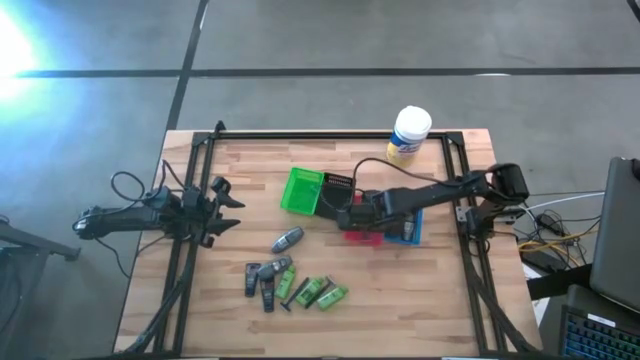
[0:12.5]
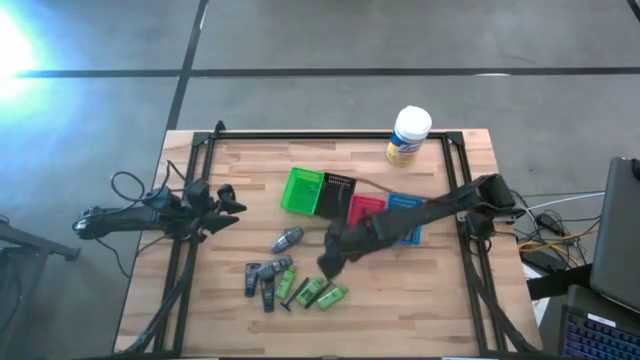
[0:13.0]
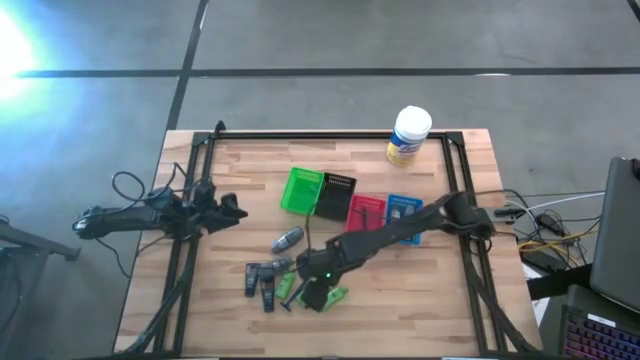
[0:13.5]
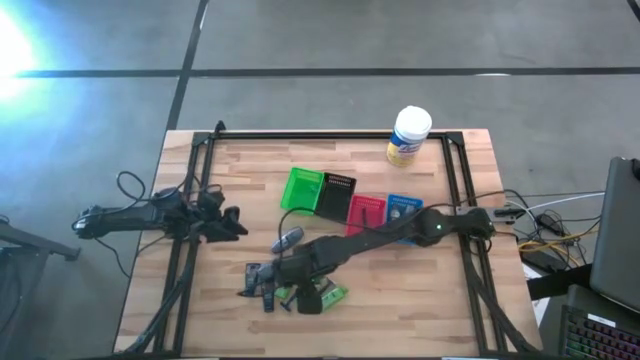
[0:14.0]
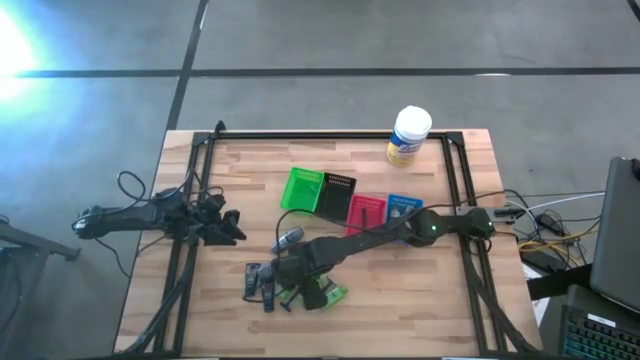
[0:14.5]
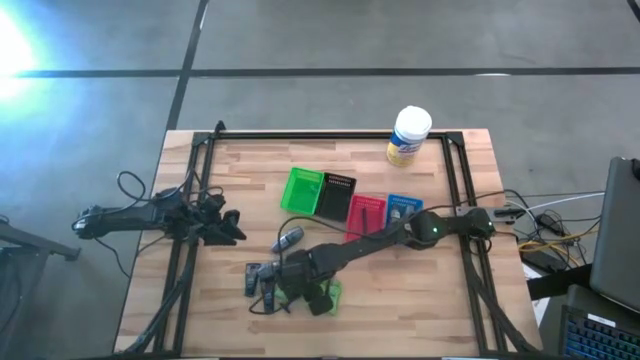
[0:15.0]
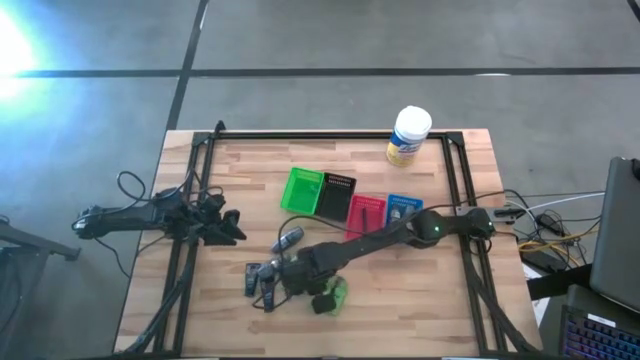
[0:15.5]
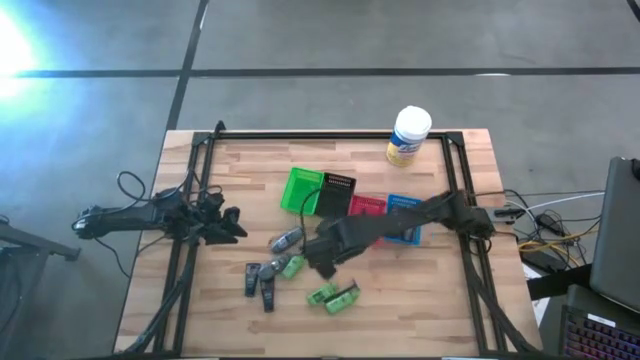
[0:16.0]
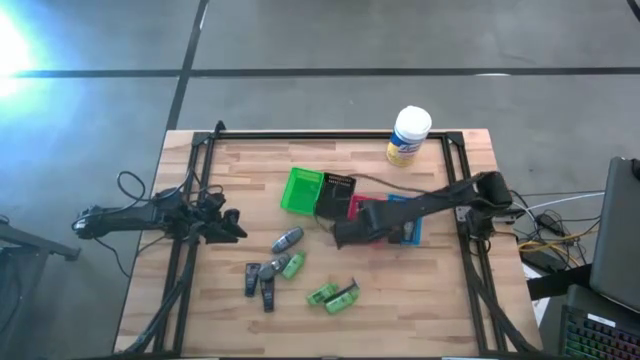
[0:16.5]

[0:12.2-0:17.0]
Task: Pick & Place Travel size toiletries
Put the razor into the red bin

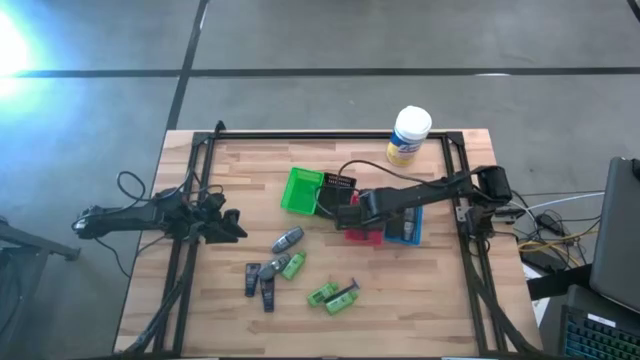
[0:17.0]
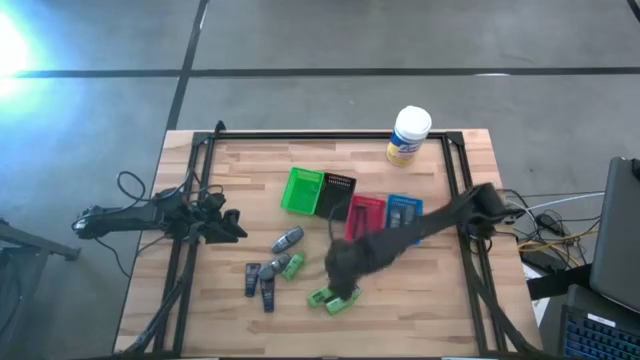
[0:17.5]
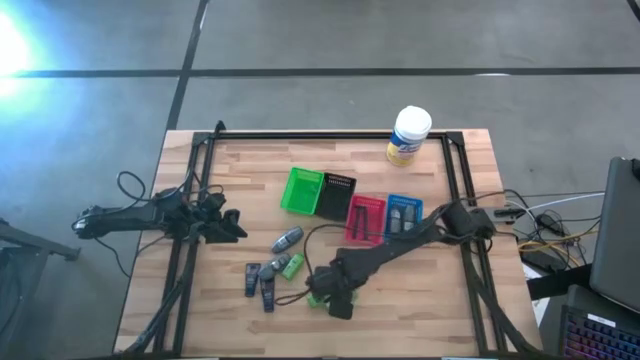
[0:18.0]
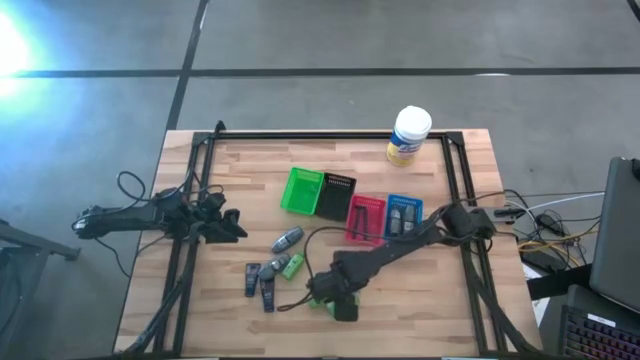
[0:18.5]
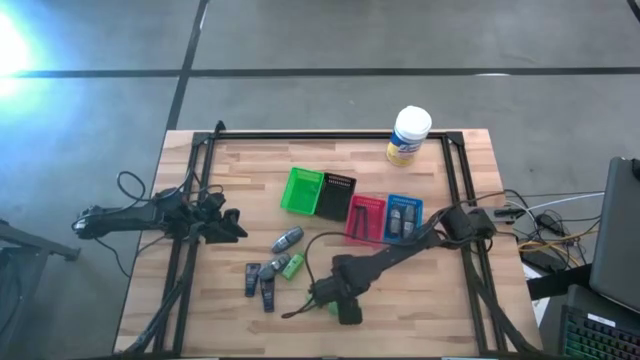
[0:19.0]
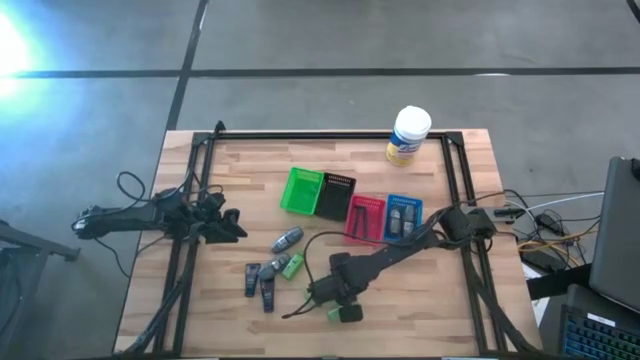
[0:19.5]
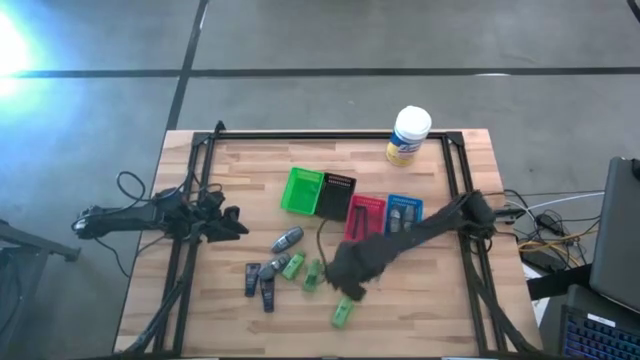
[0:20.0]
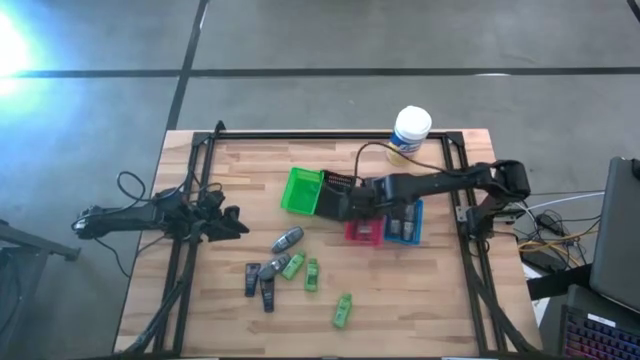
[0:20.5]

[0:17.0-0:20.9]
Put the razor into the red bin

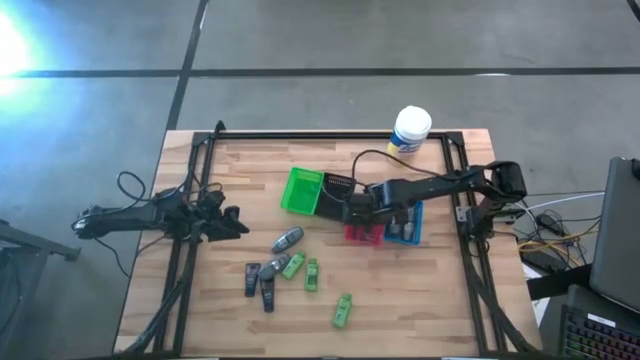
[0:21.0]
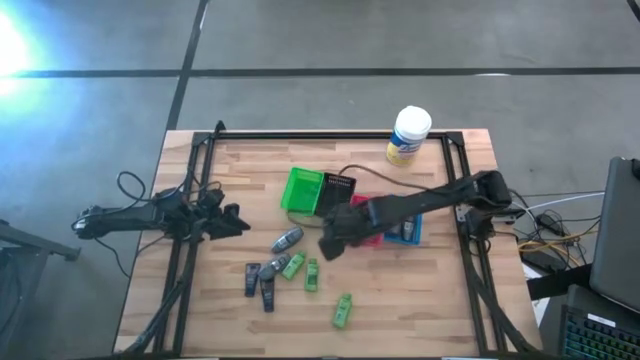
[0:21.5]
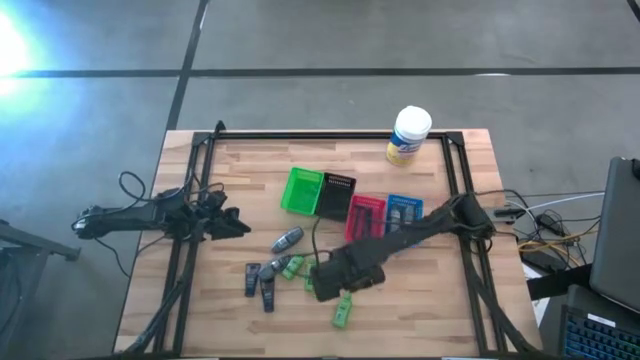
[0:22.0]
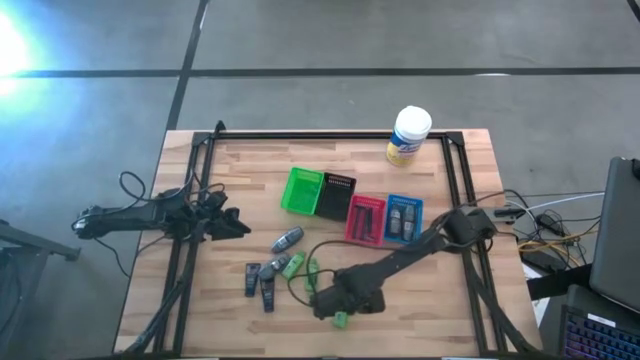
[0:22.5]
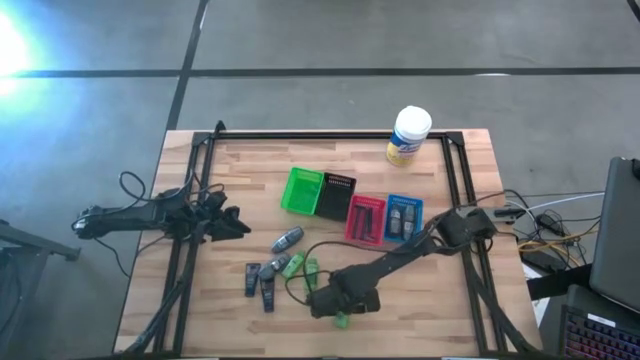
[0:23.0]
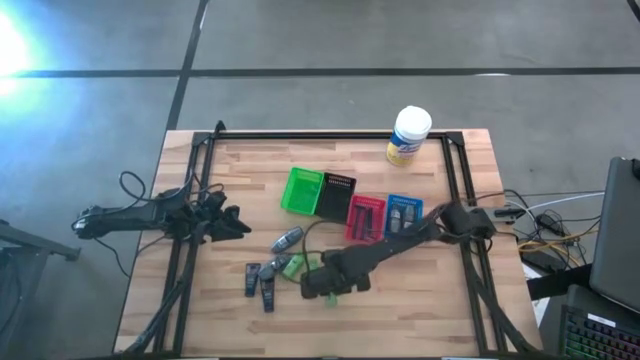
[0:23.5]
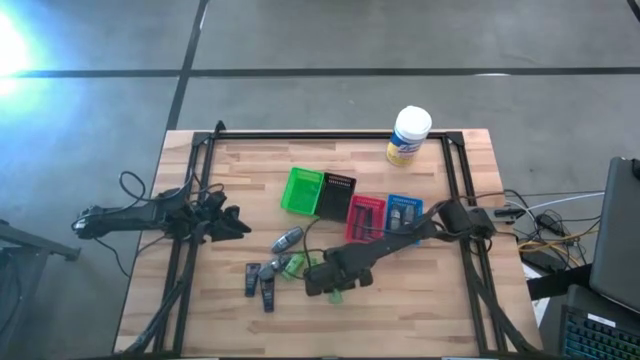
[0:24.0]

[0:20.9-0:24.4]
Adjust the green shampoo

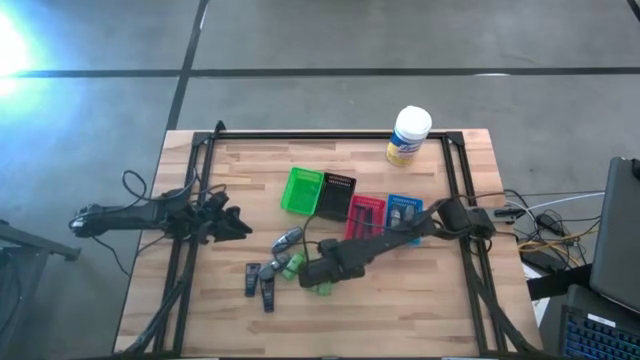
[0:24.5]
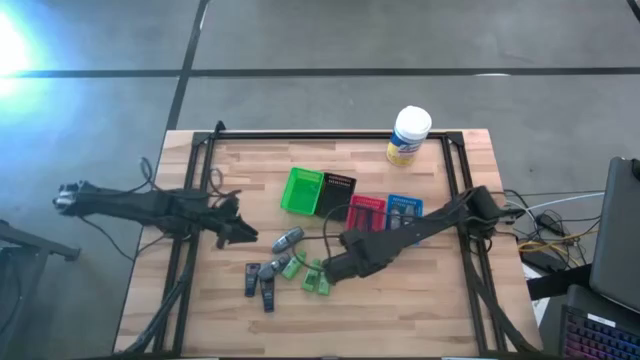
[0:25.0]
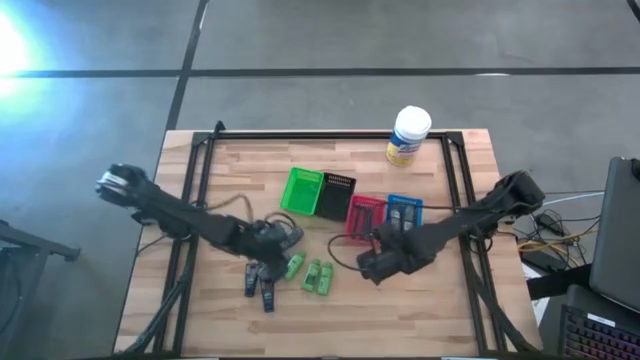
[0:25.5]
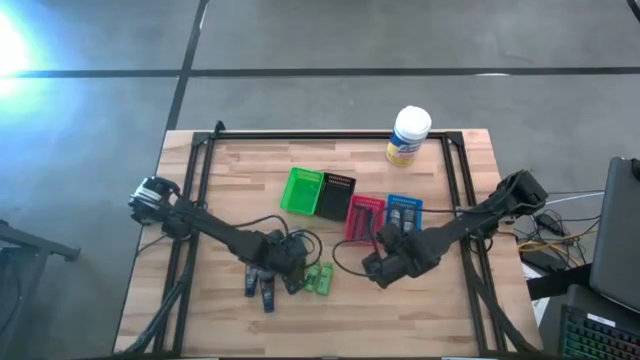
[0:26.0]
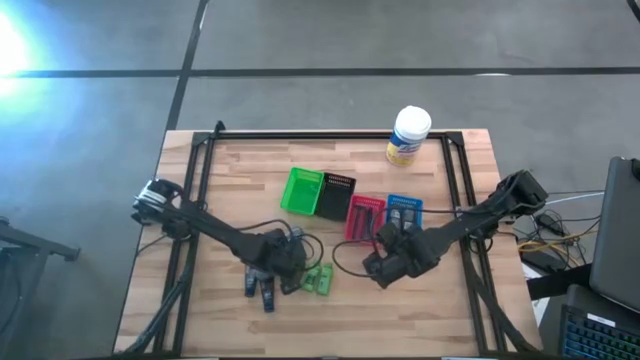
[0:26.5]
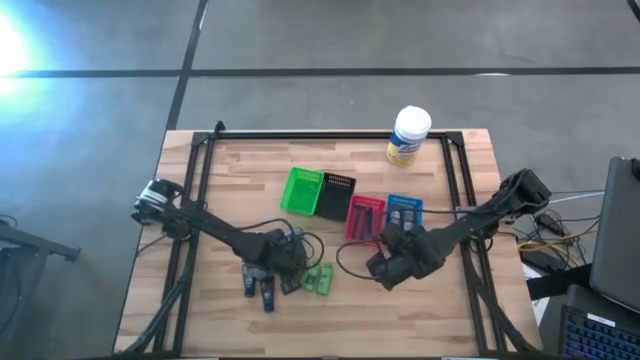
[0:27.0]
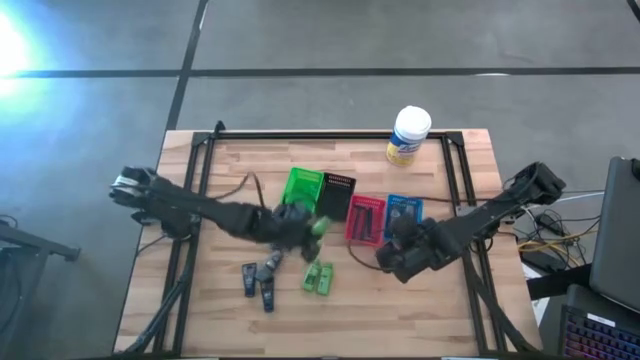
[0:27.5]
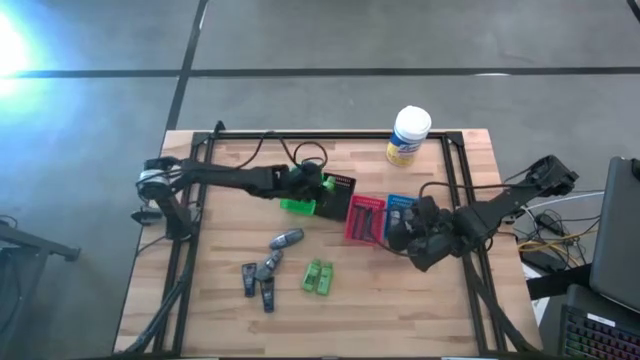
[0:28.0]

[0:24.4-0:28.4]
Put the shampoo into the black bin

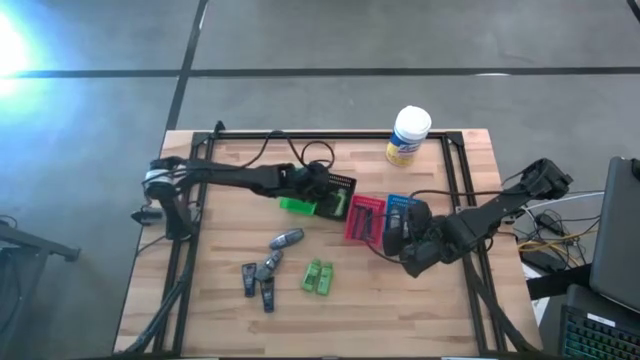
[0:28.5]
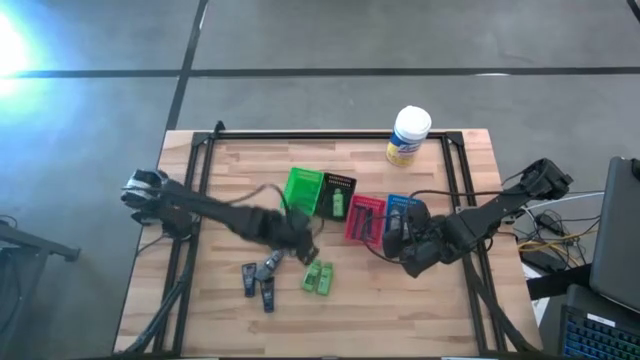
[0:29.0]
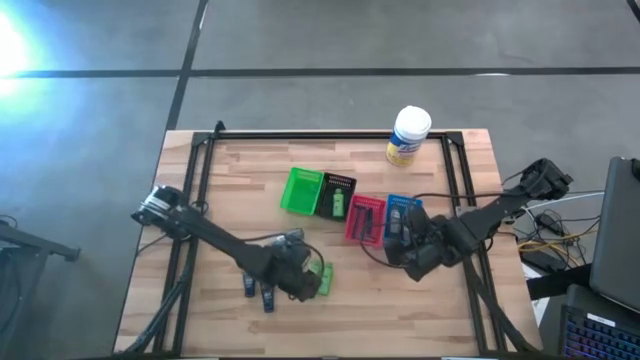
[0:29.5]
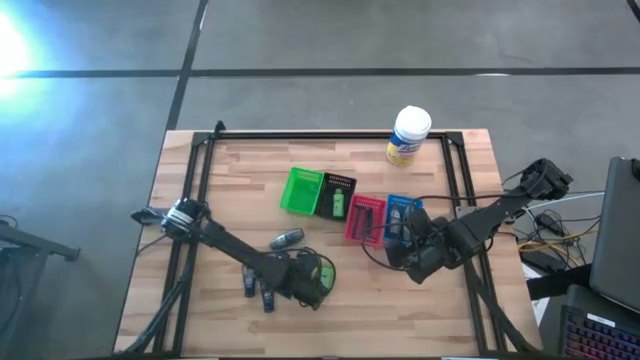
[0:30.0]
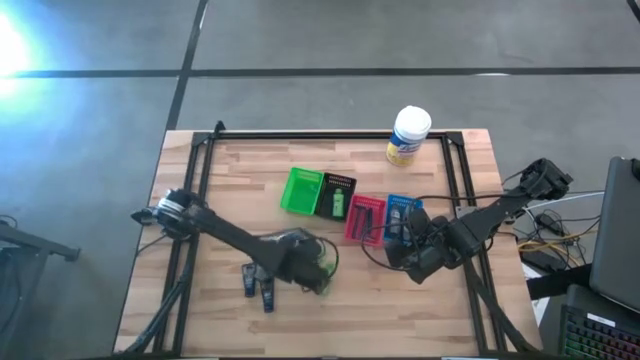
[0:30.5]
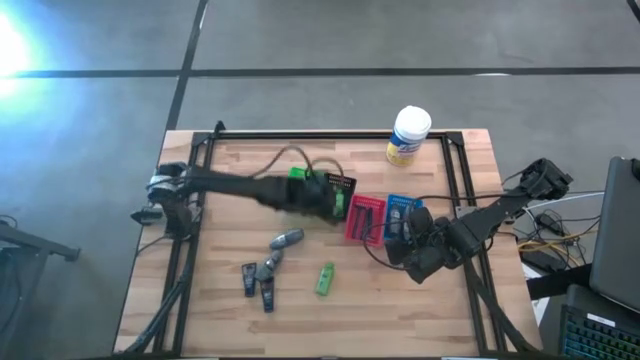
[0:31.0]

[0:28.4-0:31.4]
Put the shampoo into the black bin

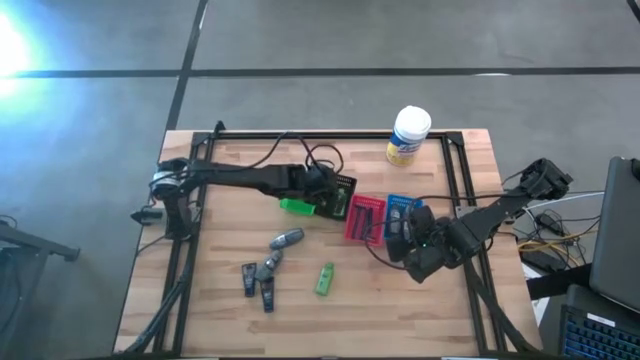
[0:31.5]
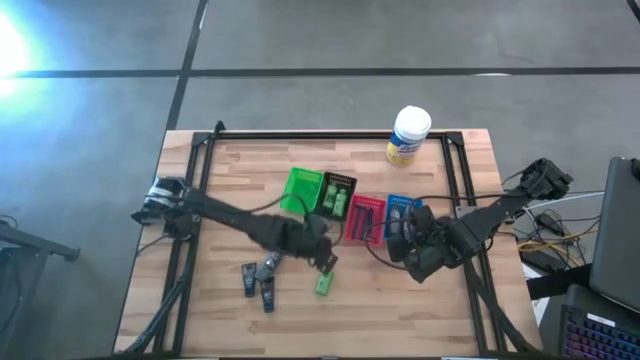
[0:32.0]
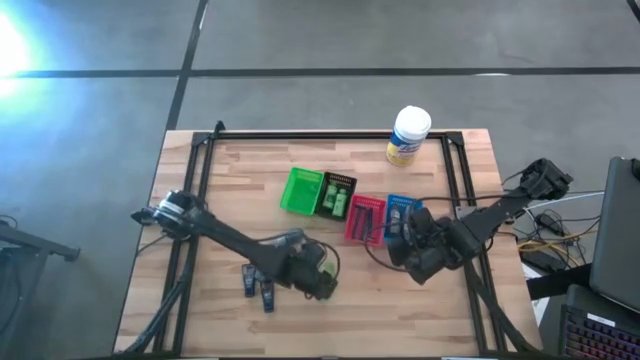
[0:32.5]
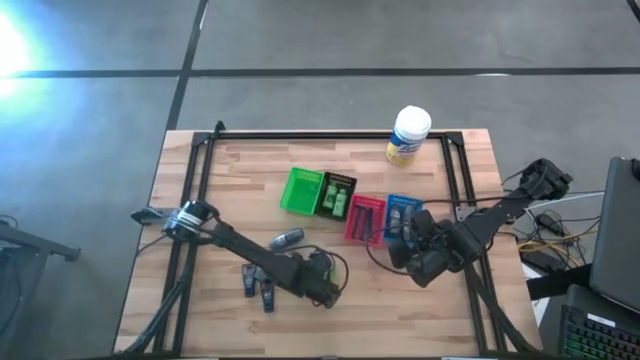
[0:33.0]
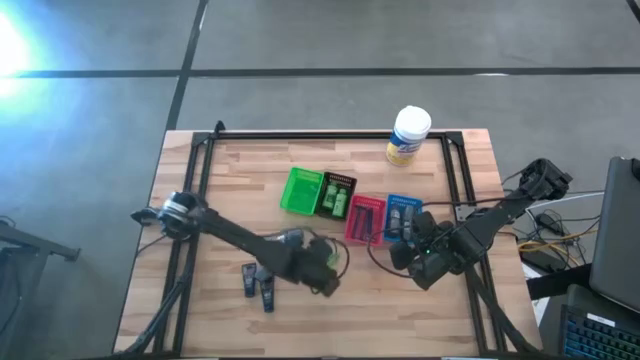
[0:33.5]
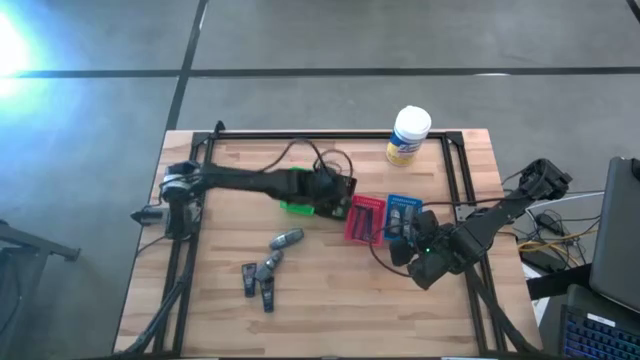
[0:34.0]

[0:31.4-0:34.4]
Put the shampoo into the black bin
